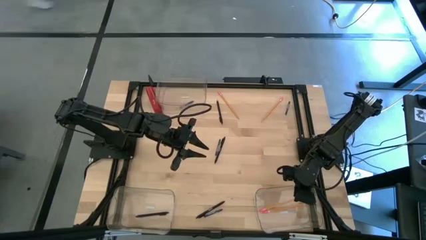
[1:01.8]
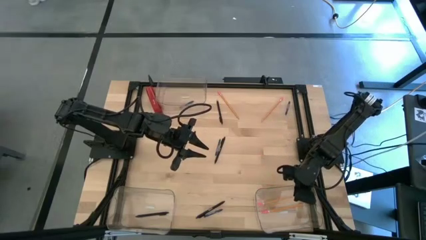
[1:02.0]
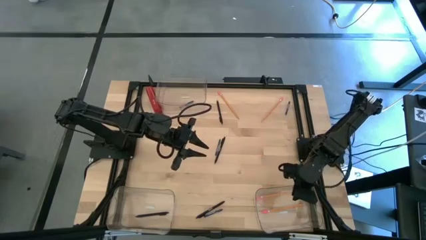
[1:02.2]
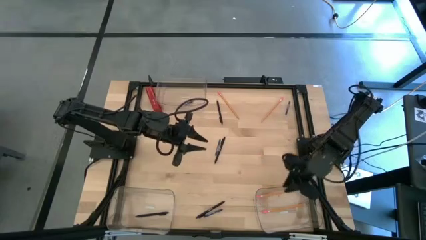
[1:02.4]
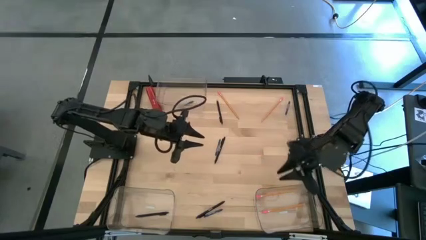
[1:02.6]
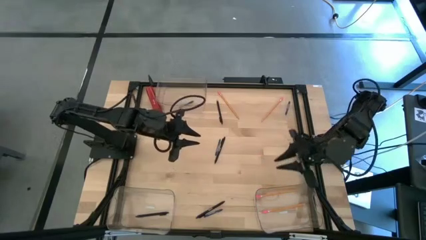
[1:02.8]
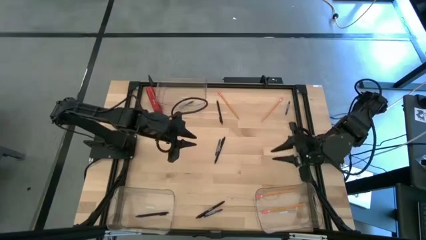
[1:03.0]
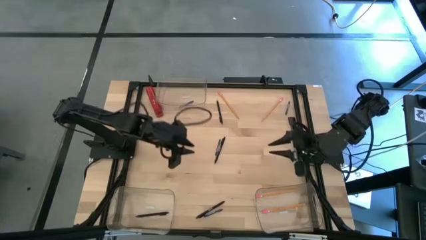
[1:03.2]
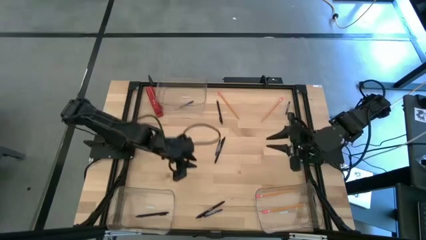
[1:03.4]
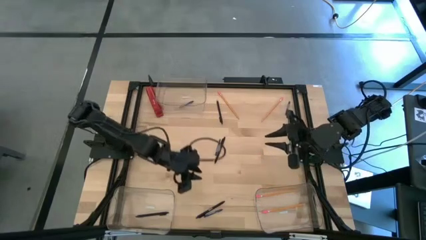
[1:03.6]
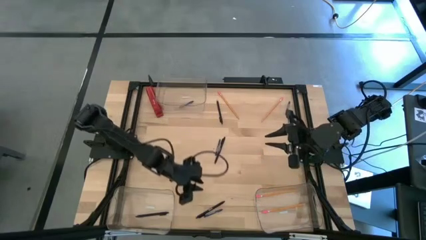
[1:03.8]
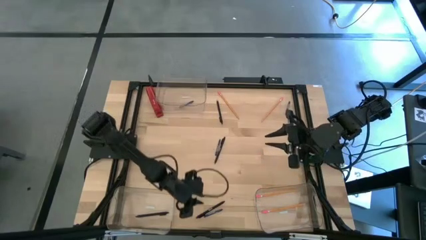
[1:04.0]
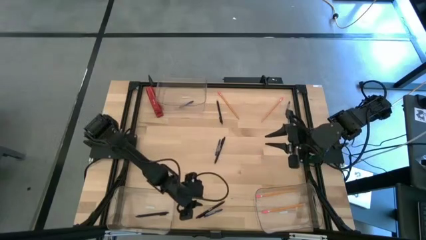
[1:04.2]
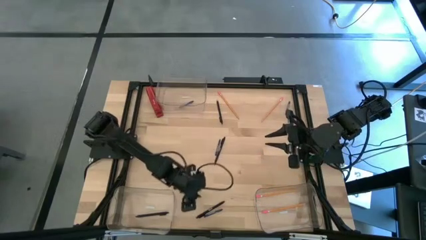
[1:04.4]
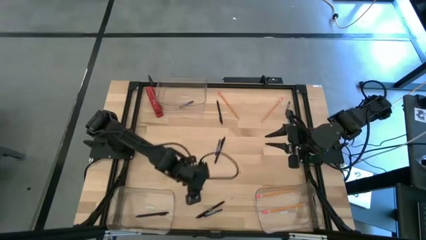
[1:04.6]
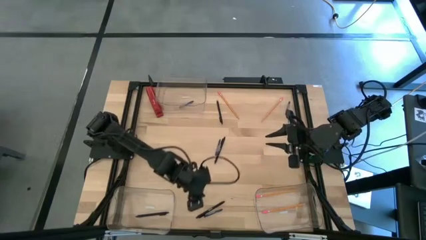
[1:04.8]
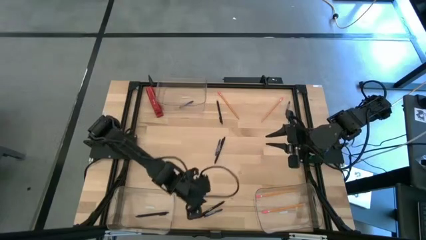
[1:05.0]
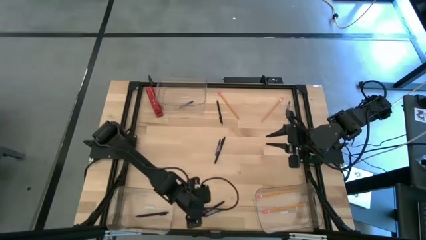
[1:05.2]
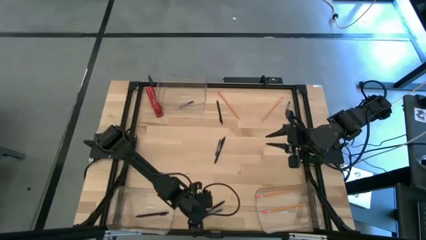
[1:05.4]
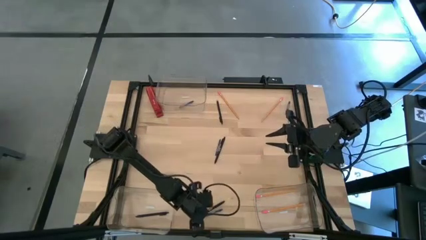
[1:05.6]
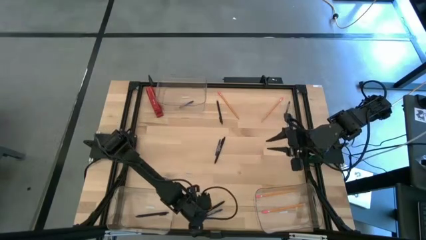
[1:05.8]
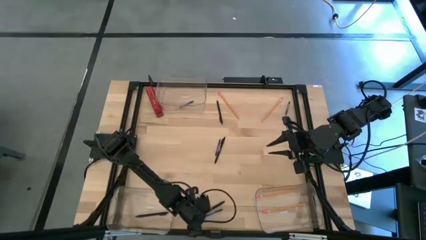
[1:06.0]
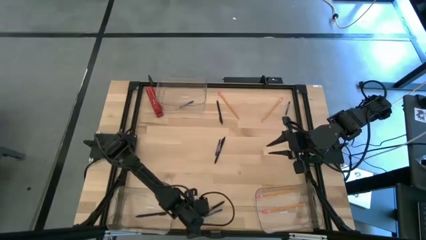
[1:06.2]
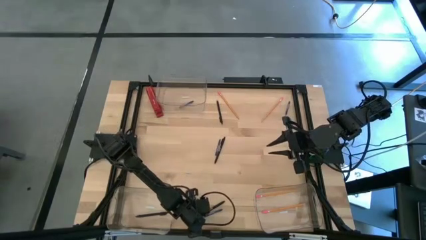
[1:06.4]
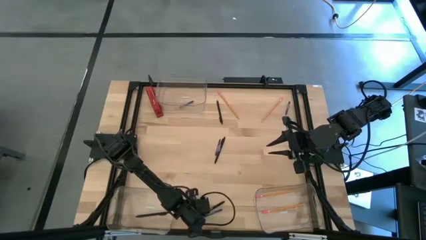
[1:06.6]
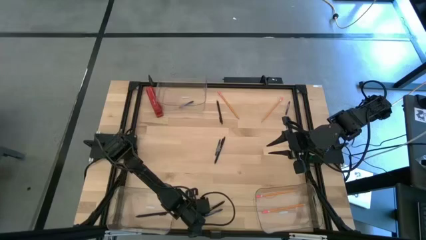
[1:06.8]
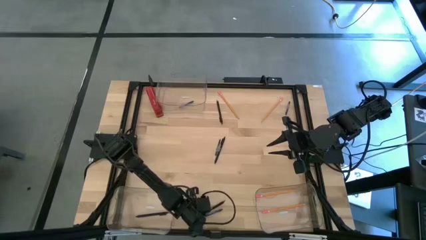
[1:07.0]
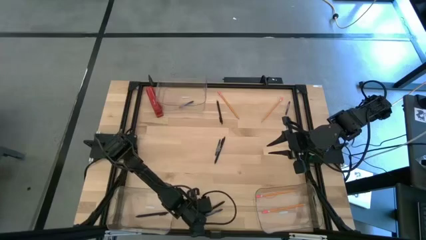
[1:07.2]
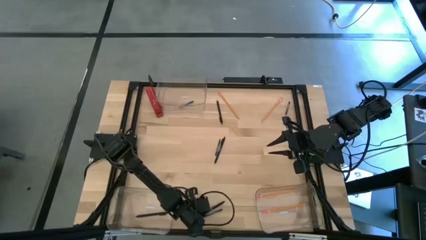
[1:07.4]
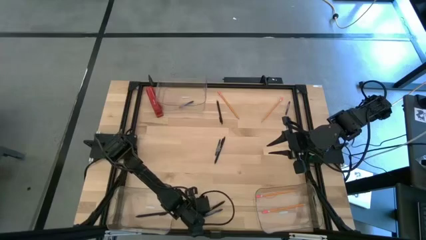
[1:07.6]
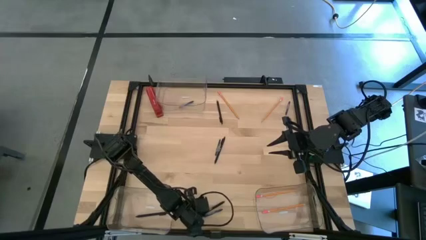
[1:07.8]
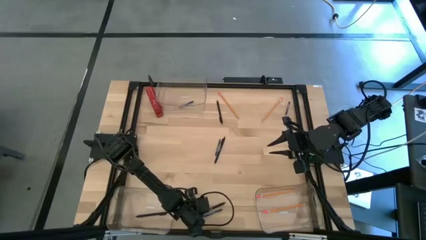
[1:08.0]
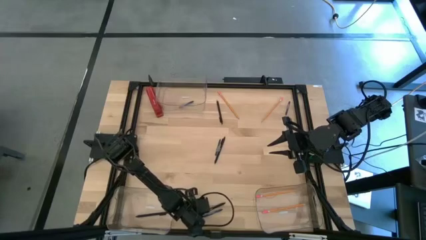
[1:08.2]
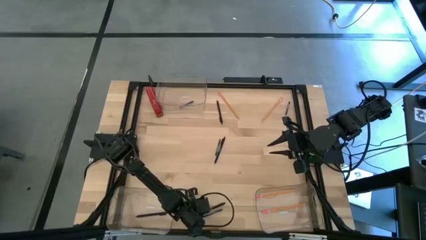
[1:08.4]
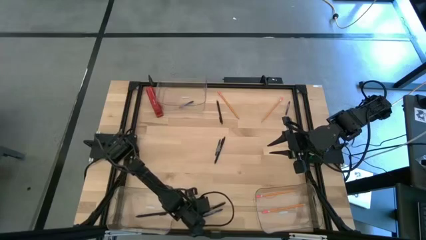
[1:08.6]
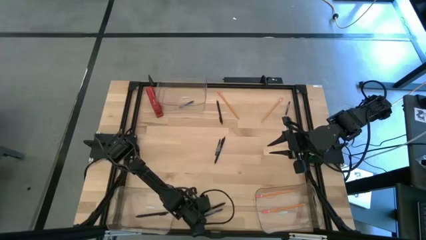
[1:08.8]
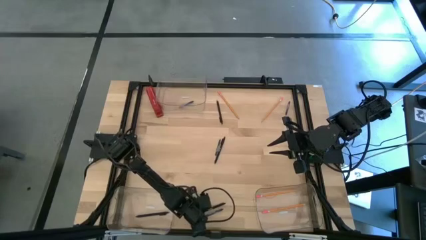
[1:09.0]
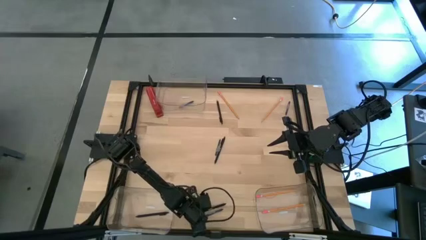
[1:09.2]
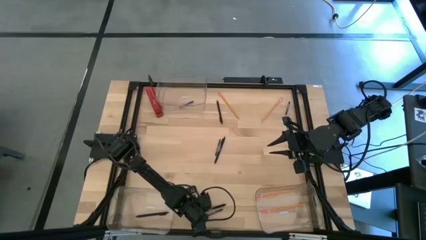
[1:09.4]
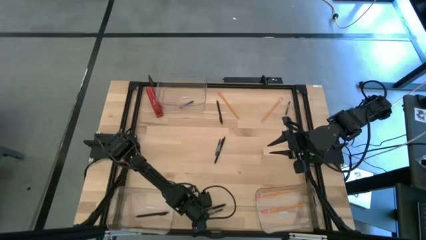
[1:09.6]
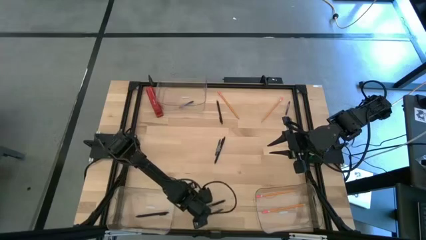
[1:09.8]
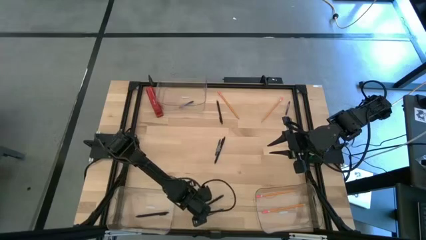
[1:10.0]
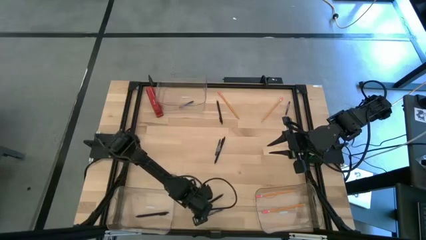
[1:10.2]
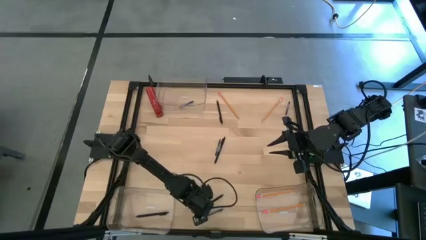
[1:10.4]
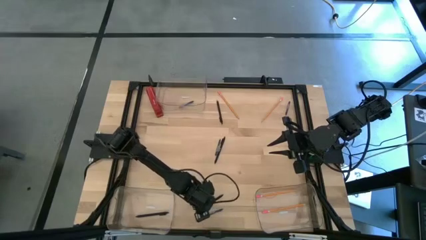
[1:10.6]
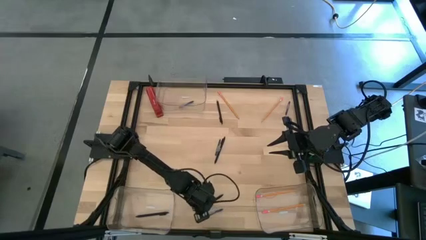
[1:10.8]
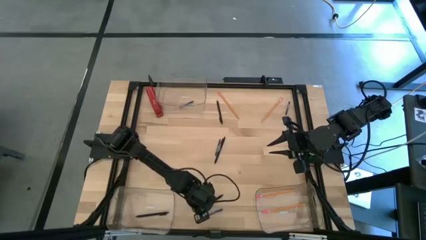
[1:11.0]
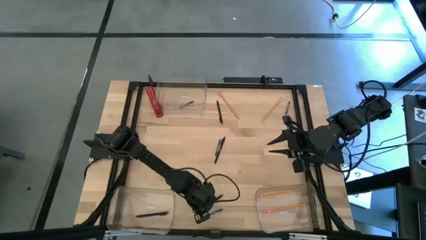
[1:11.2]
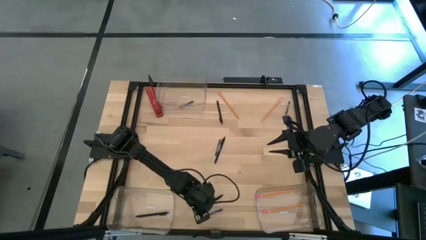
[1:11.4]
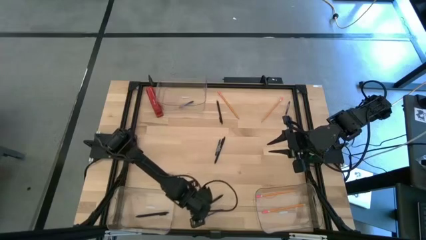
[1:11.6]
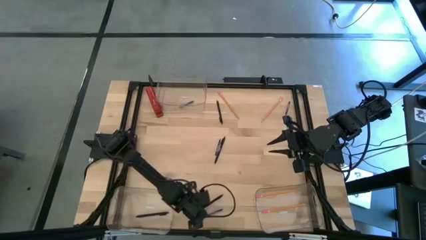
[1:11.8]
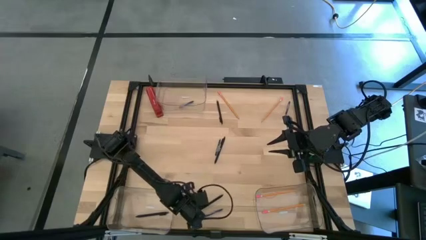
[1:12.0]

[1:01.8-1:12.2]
Task: Sort crayons/erasers/pens/pencils in bins
Put the black pen into the bottom left transparent bin
